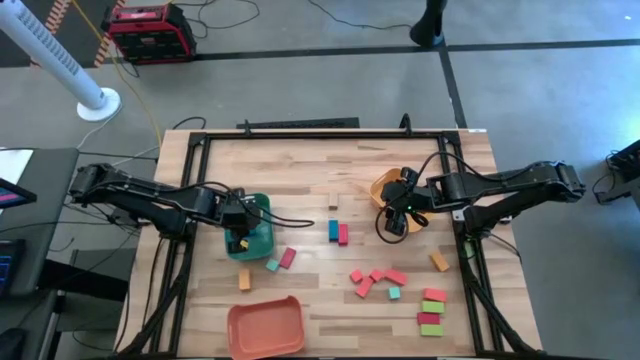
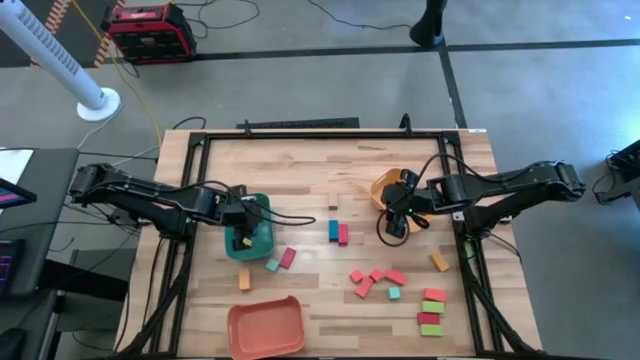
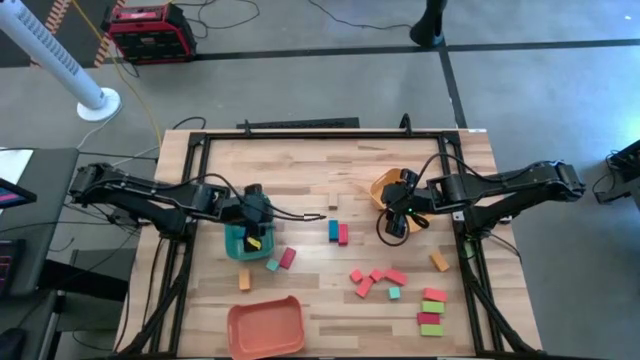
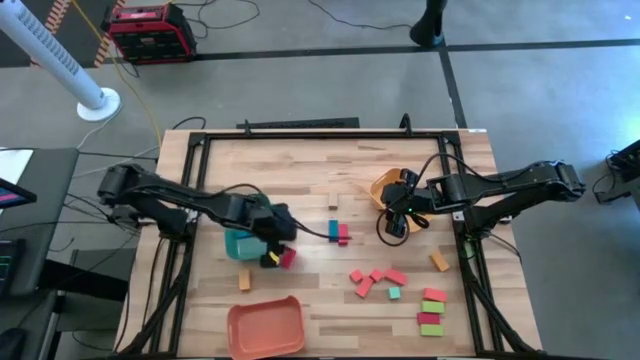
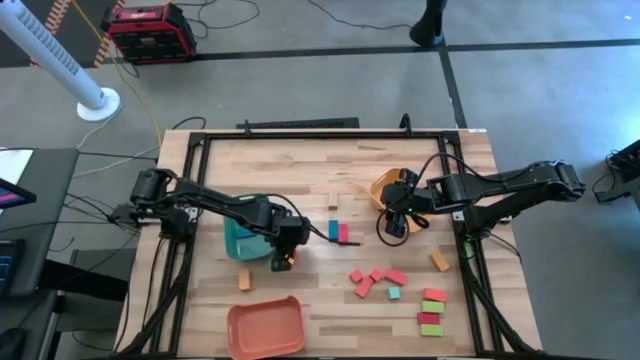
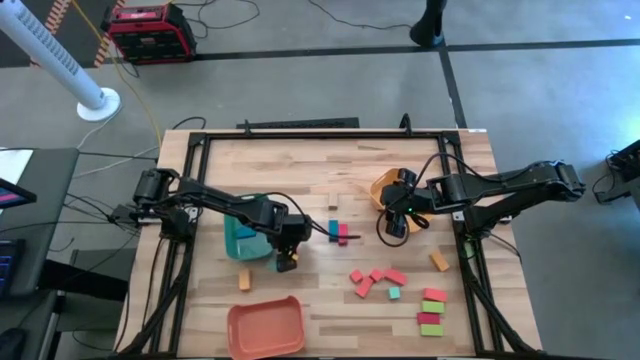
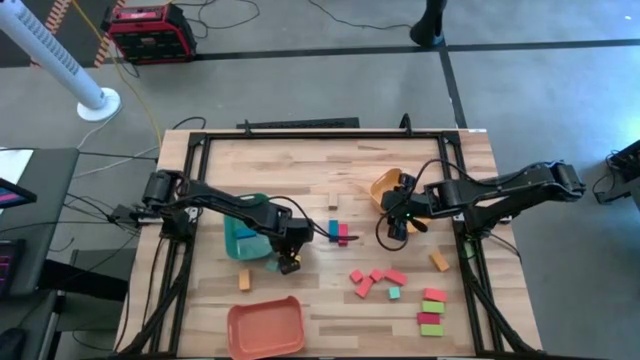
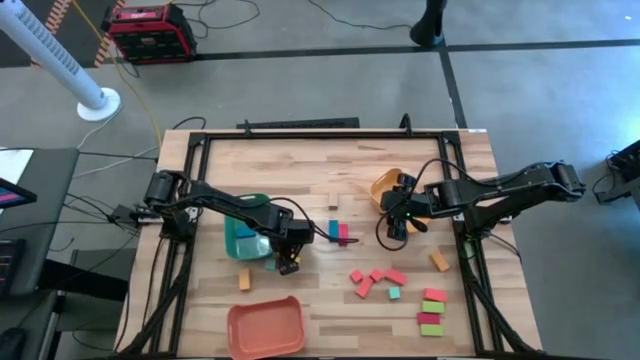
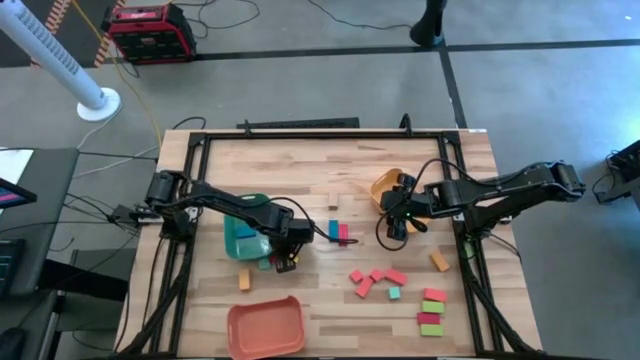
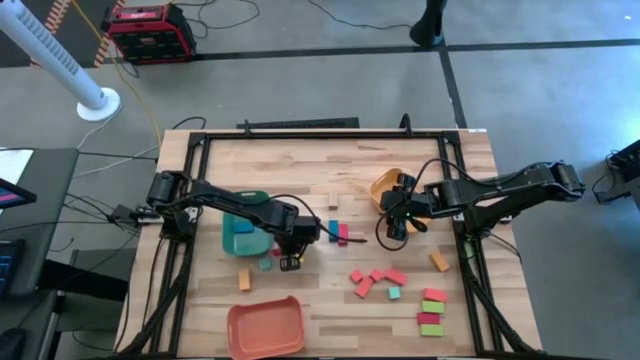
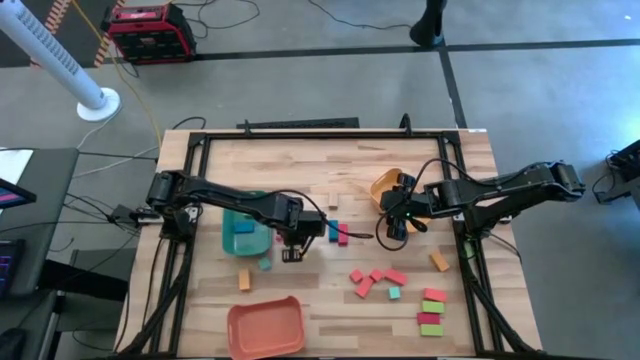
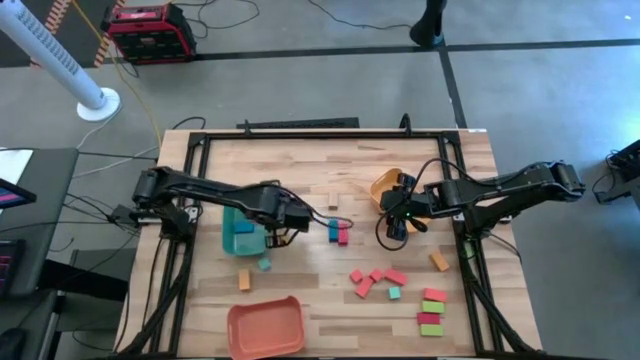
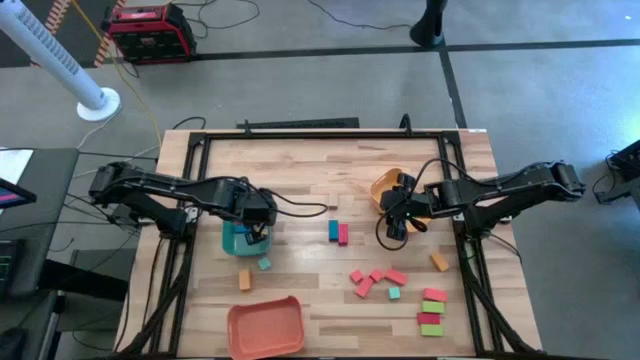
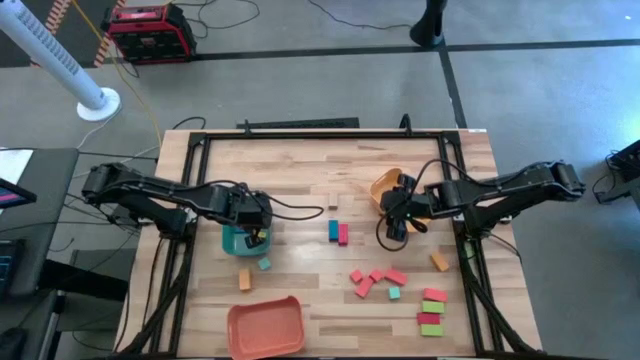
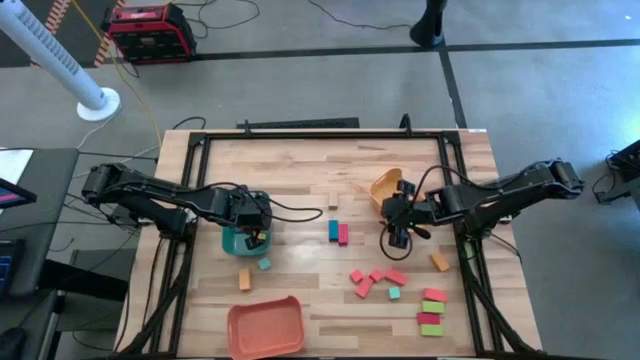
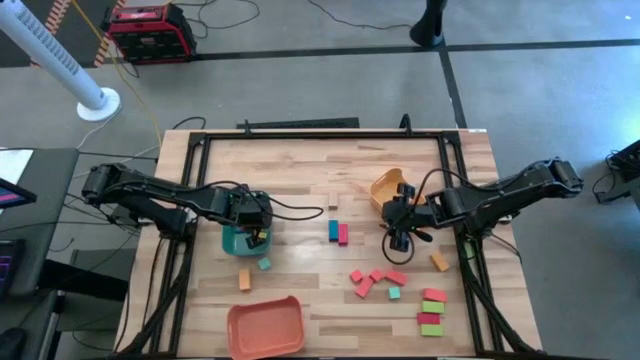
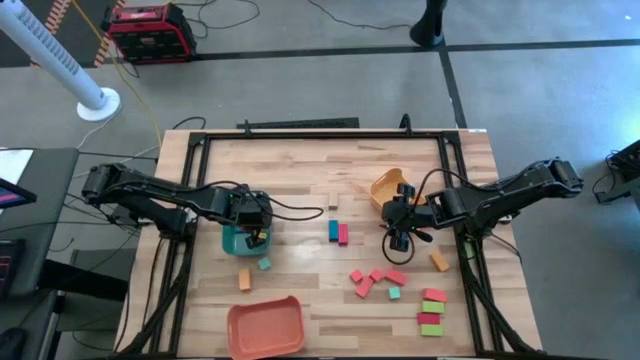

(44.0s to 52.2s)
Task: Sort blocks by size
Put the thin top red rectangular block into the green bin

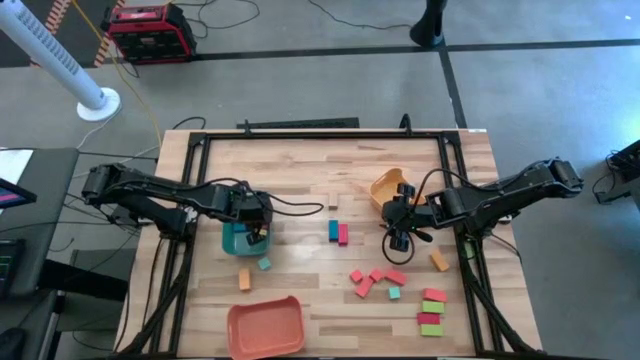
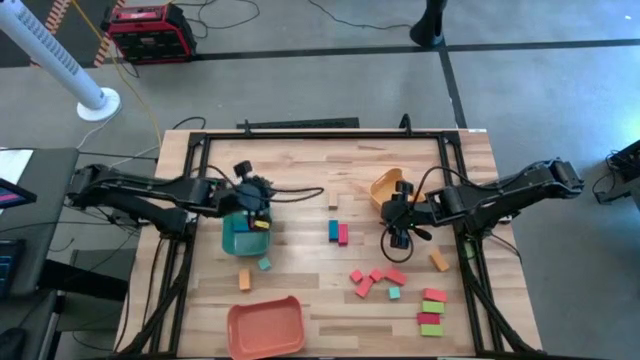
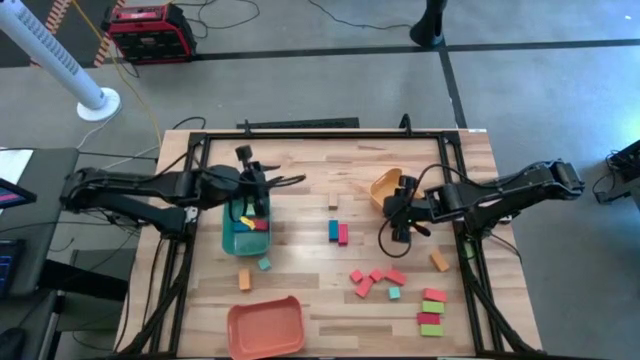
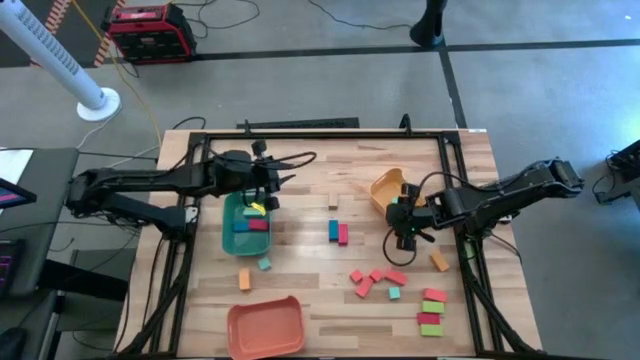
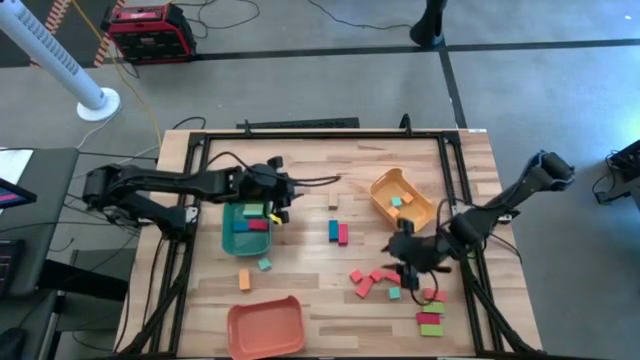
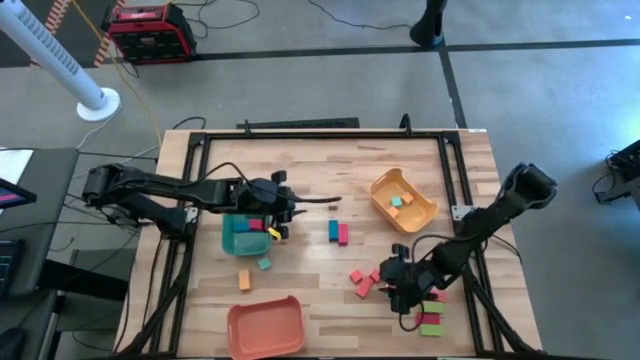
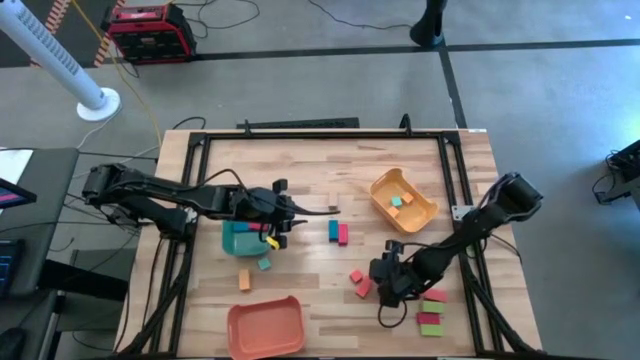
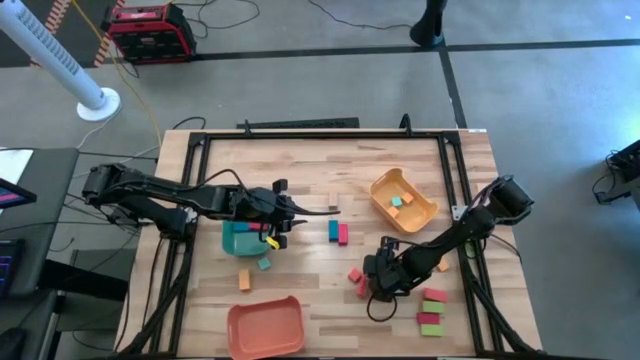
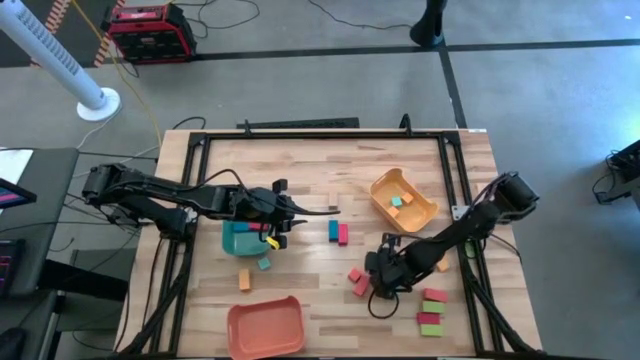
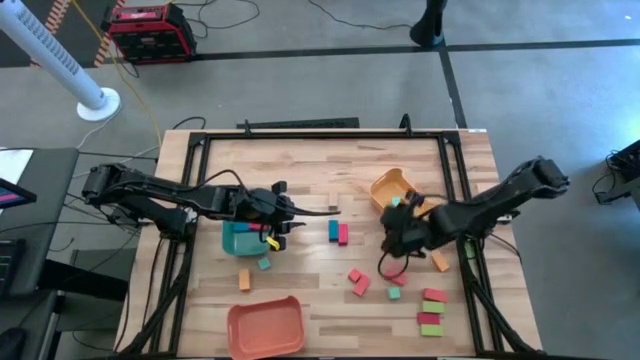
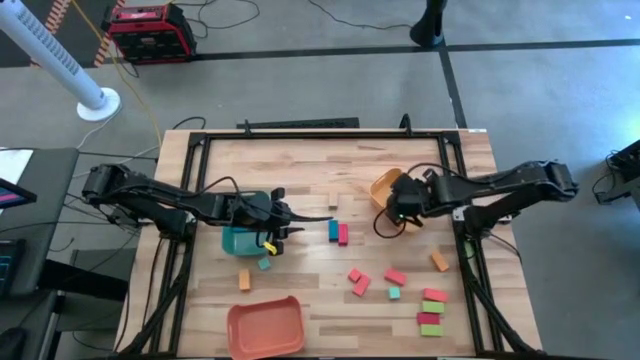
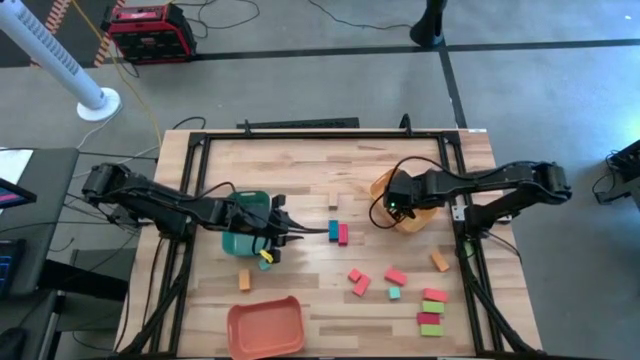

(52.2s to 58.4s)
Put the right orange cube block into the yellow bin

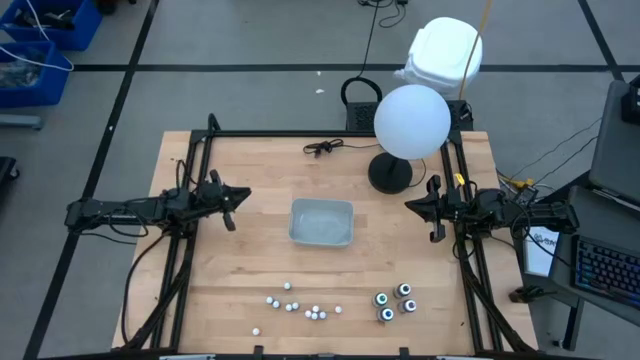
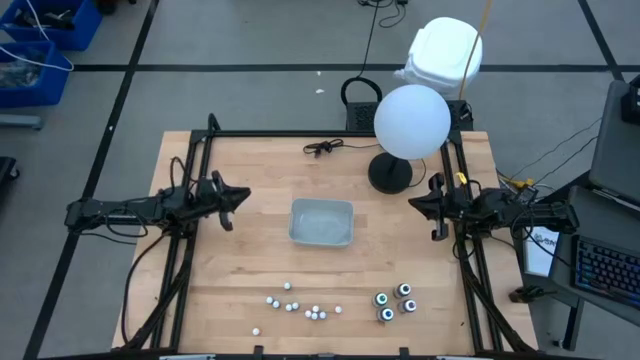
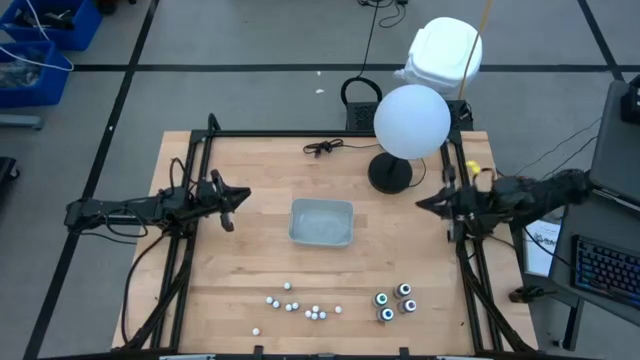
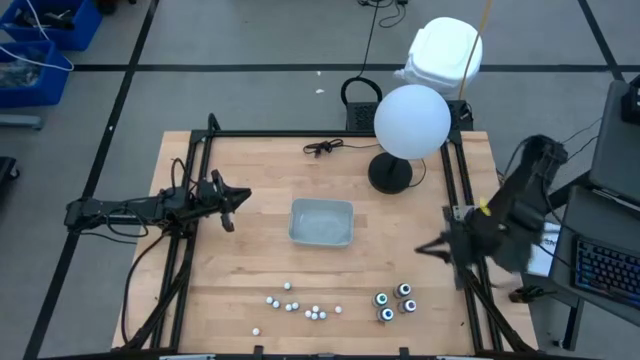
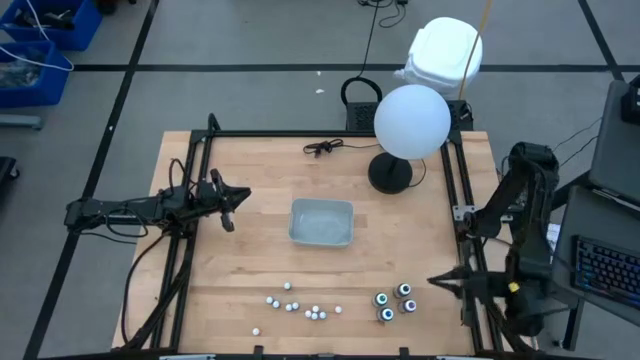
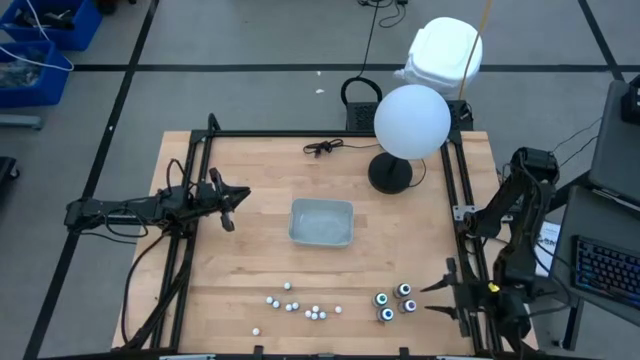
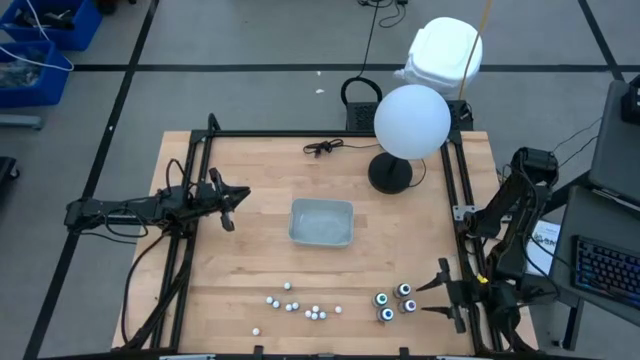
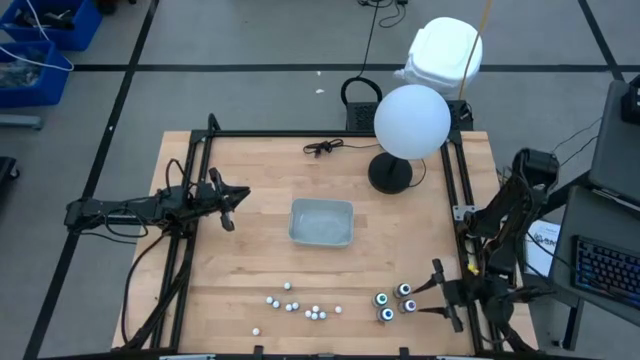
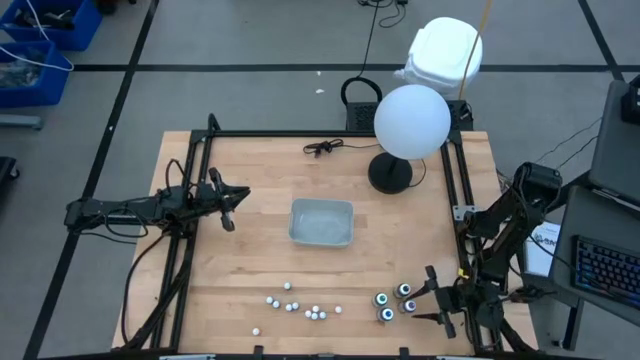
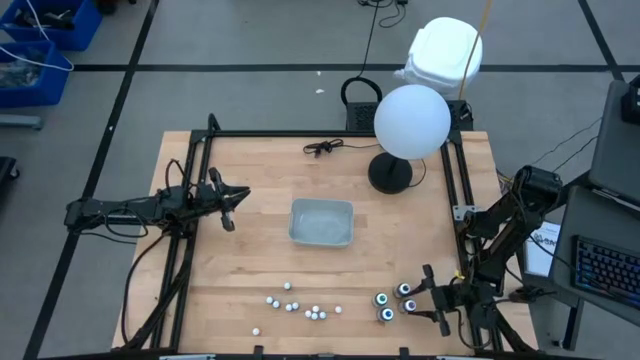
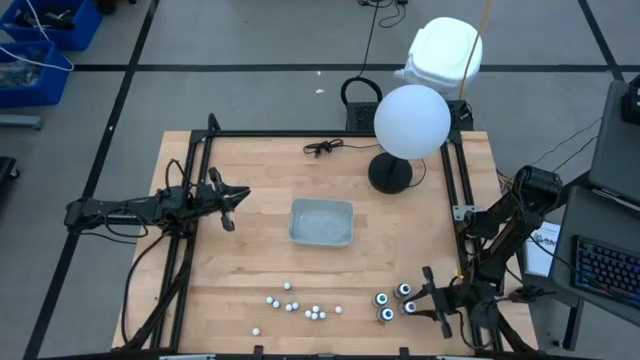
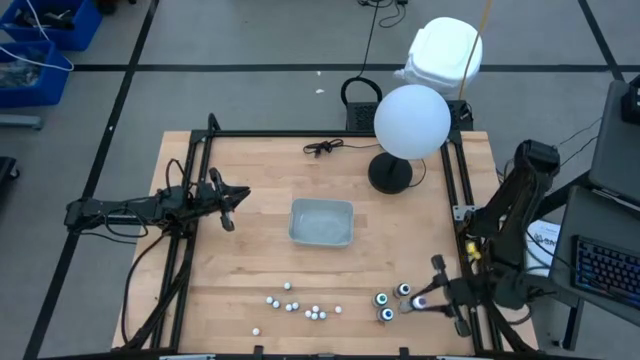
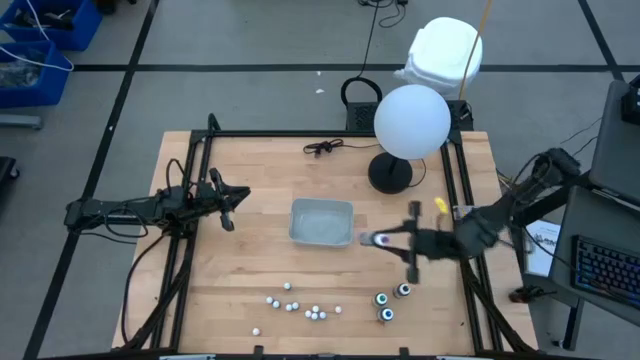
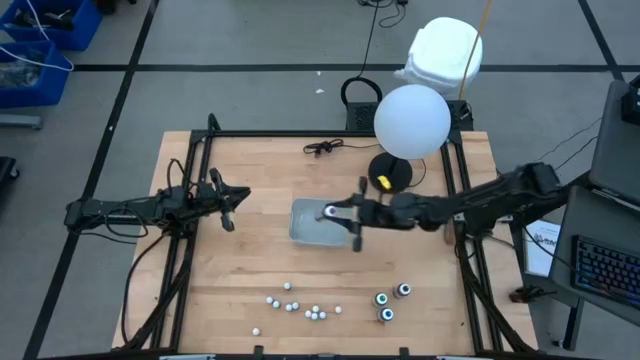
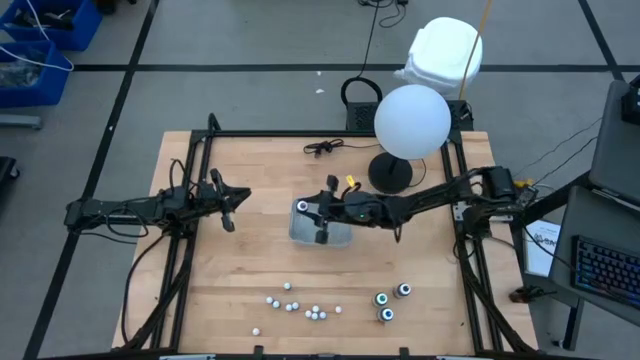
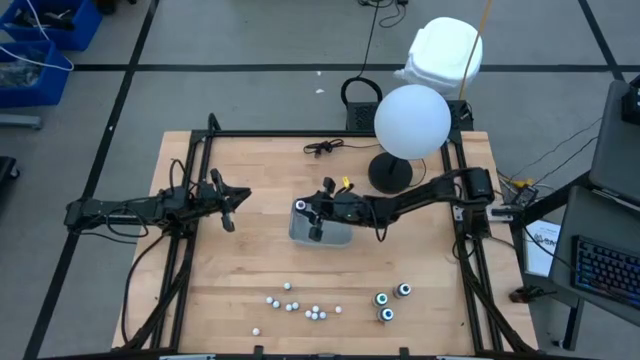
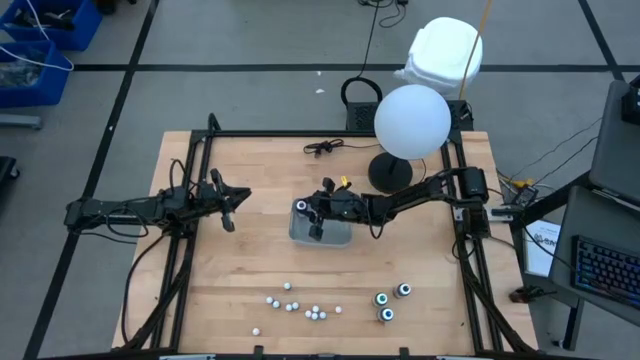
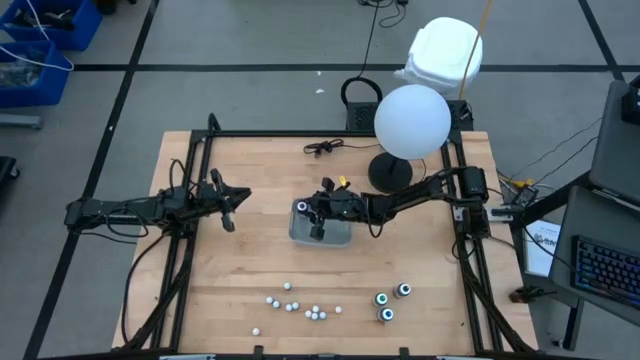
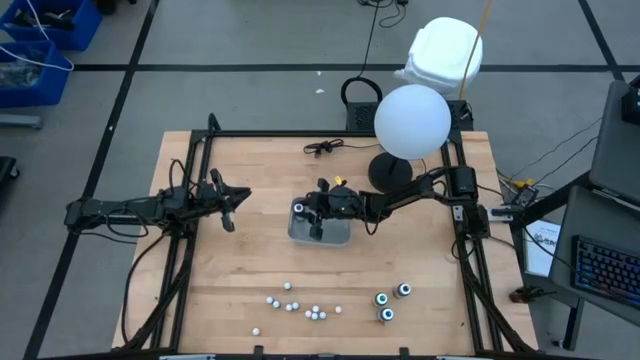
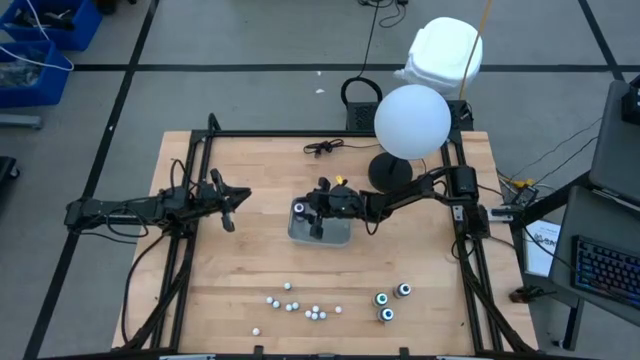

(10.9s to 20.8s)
Task: Pick & Place food coloring
Put the large violet food coloring bottle into the gray bin
